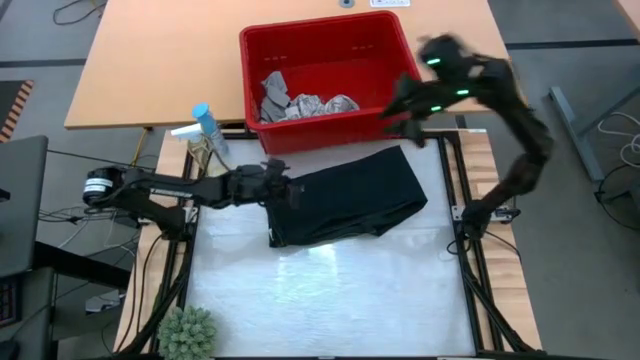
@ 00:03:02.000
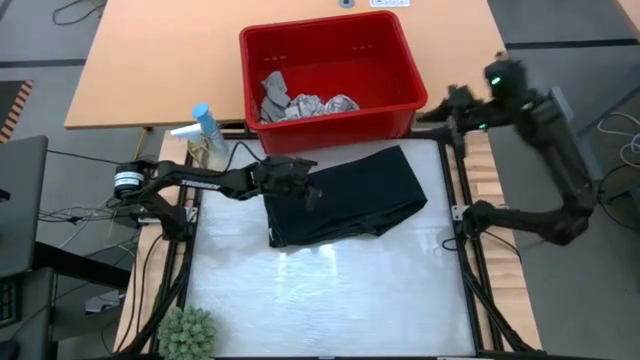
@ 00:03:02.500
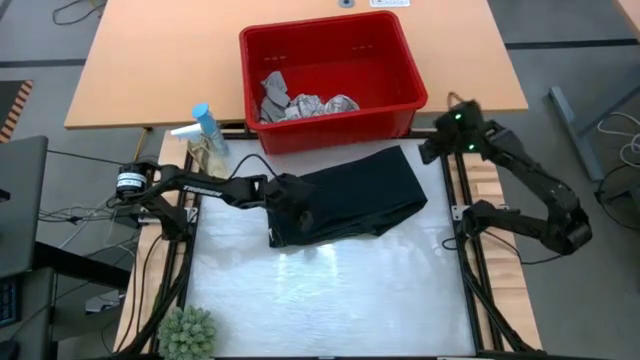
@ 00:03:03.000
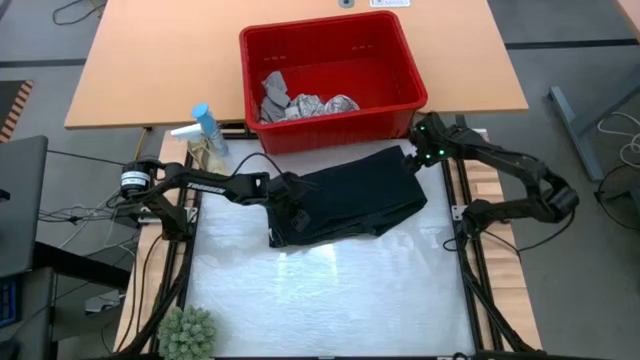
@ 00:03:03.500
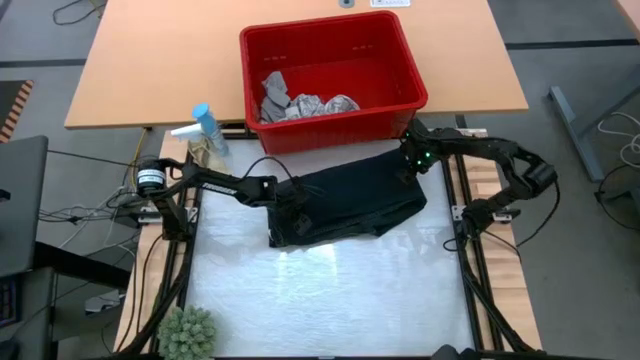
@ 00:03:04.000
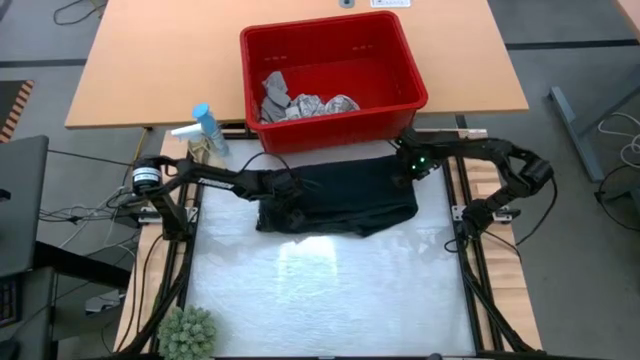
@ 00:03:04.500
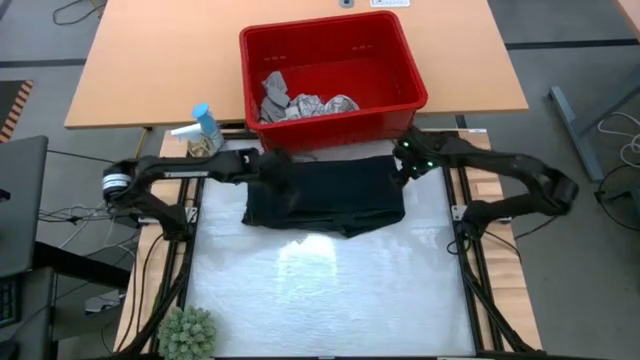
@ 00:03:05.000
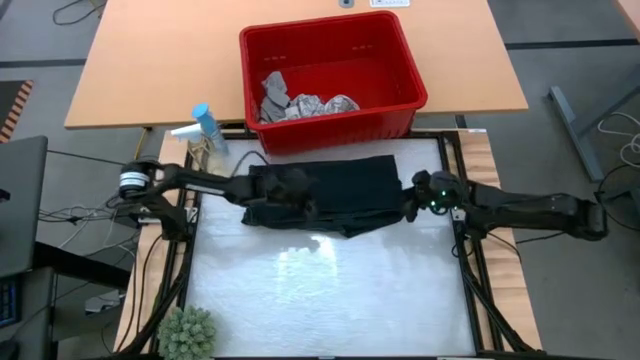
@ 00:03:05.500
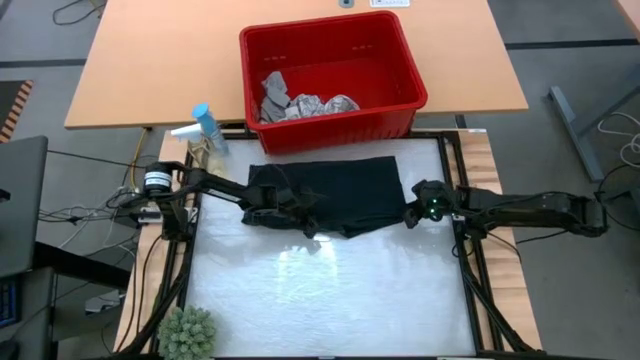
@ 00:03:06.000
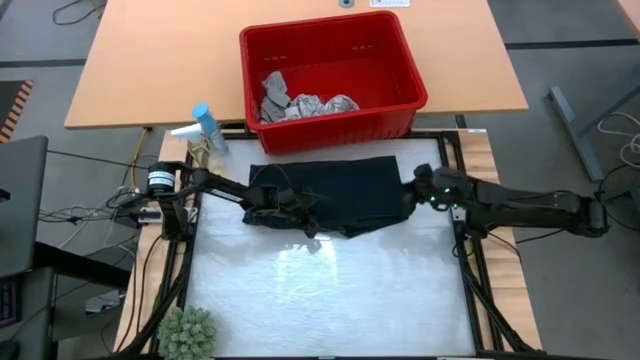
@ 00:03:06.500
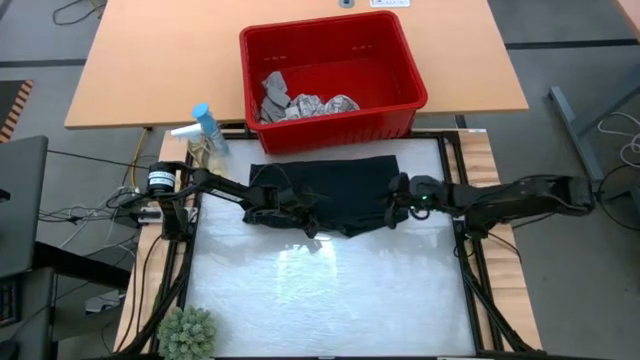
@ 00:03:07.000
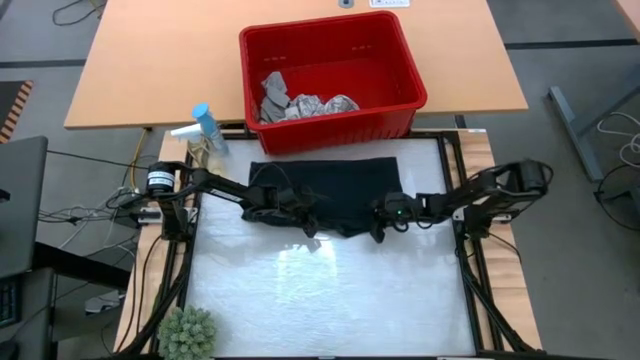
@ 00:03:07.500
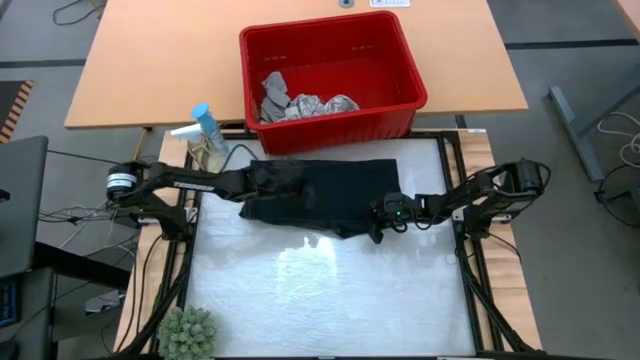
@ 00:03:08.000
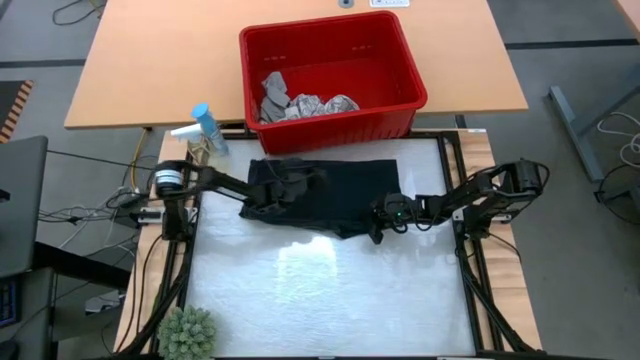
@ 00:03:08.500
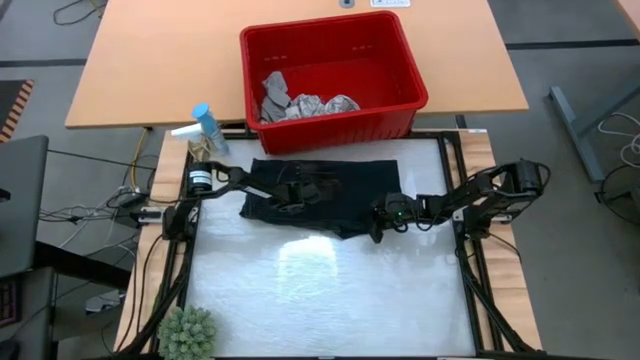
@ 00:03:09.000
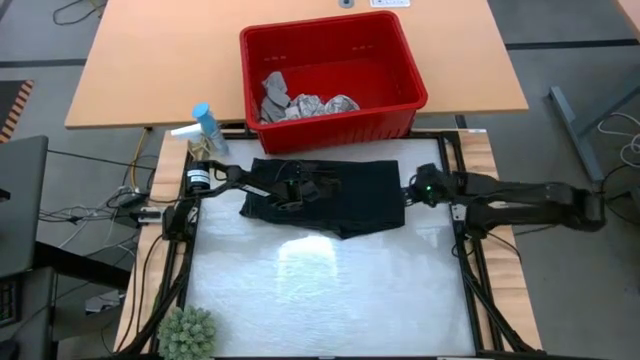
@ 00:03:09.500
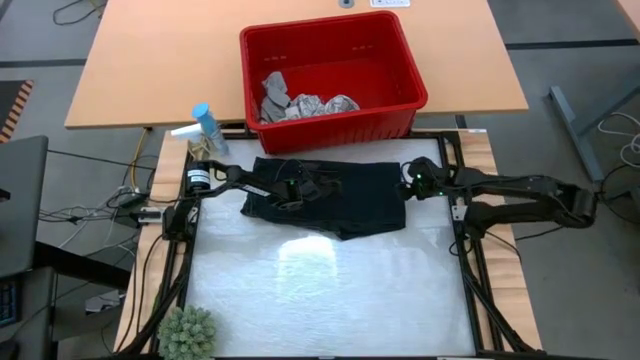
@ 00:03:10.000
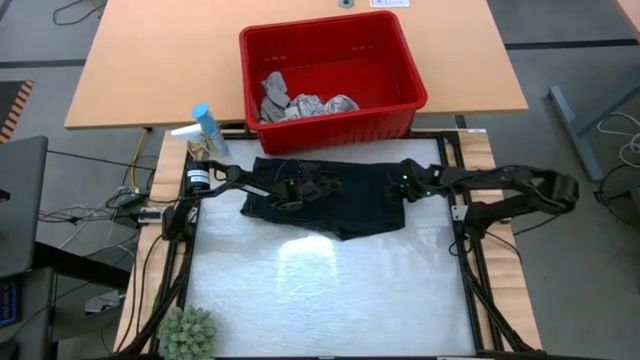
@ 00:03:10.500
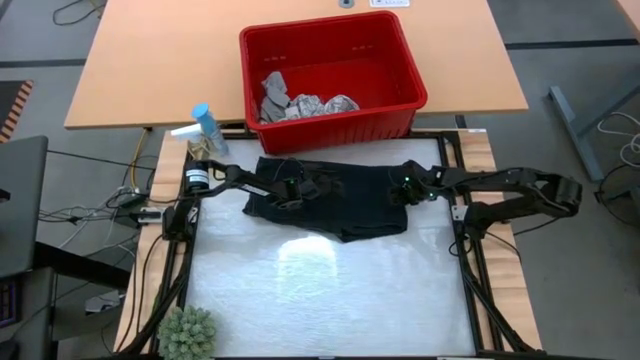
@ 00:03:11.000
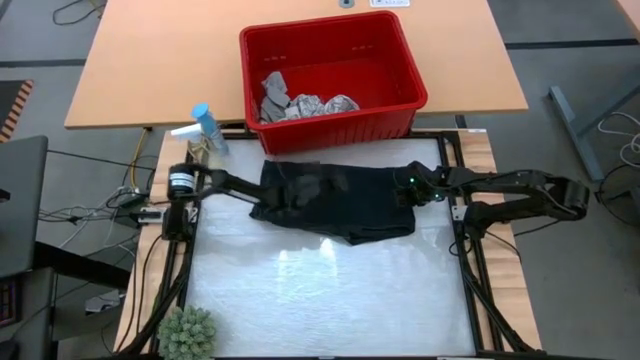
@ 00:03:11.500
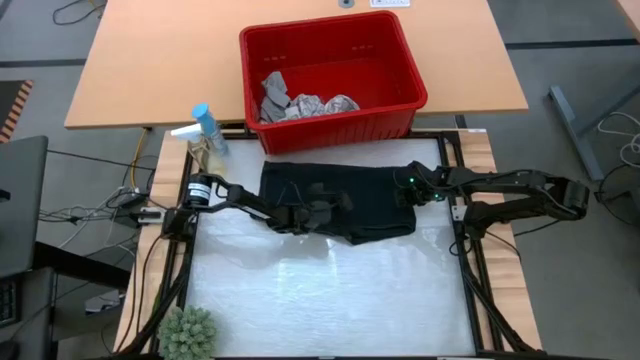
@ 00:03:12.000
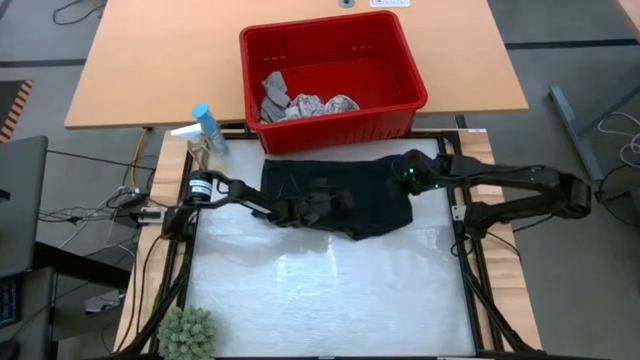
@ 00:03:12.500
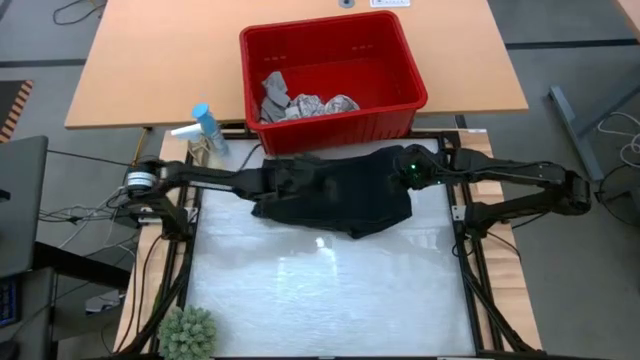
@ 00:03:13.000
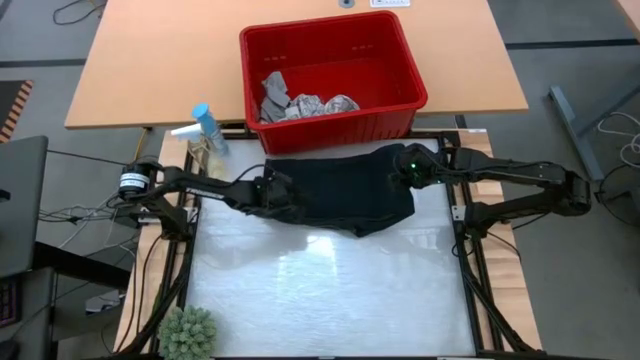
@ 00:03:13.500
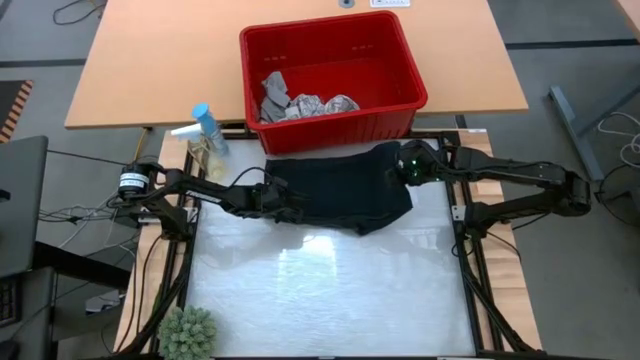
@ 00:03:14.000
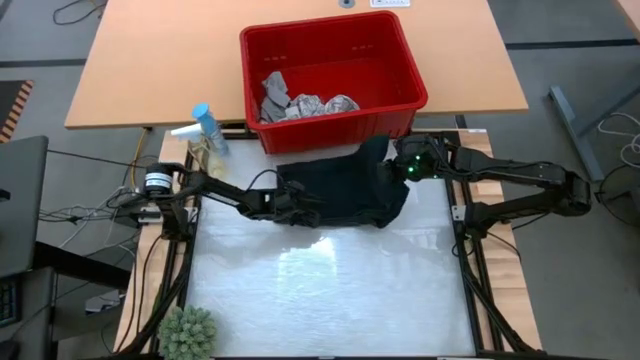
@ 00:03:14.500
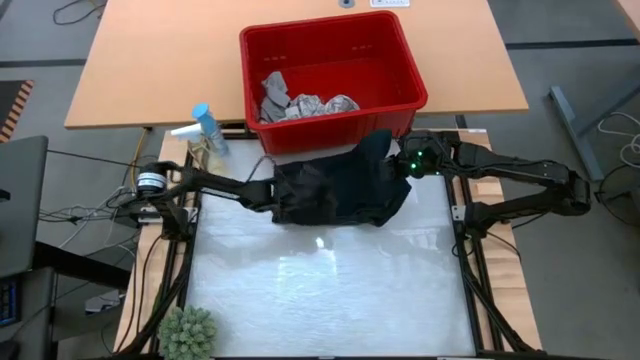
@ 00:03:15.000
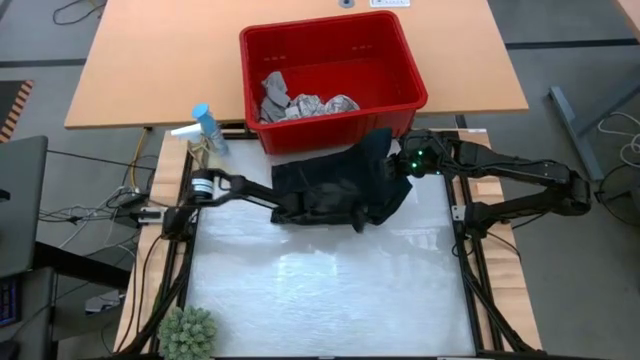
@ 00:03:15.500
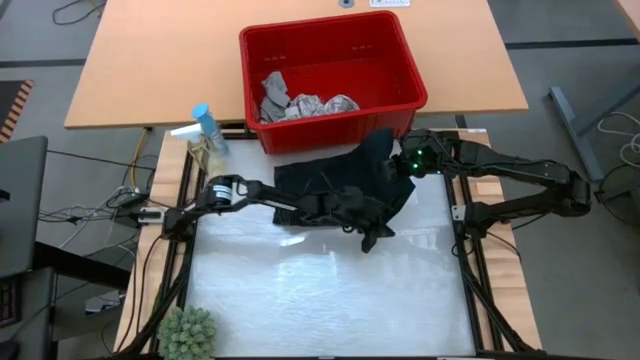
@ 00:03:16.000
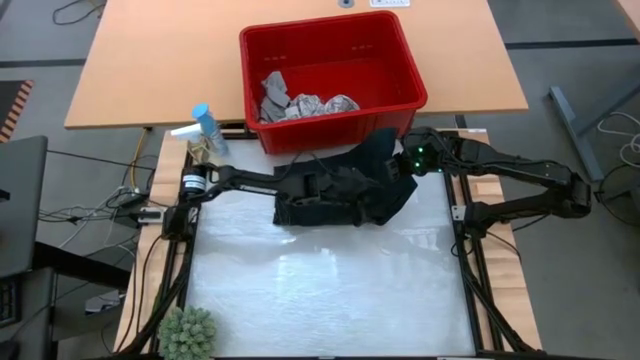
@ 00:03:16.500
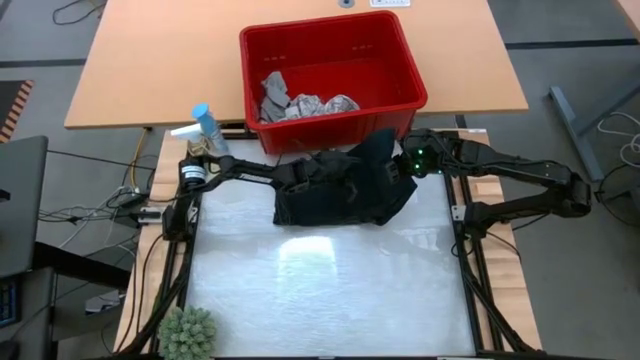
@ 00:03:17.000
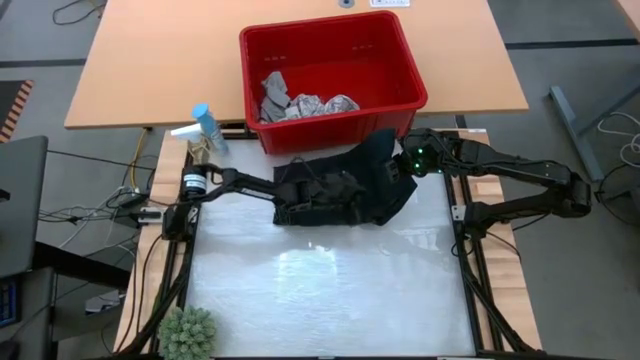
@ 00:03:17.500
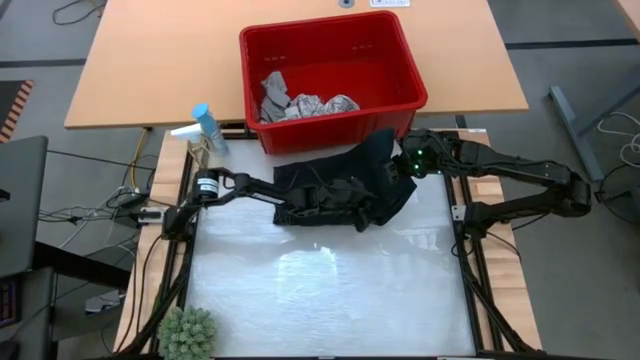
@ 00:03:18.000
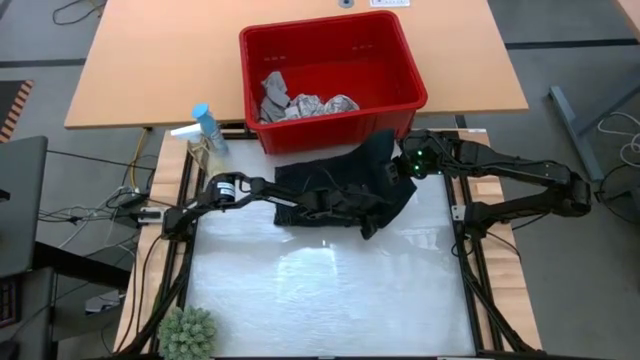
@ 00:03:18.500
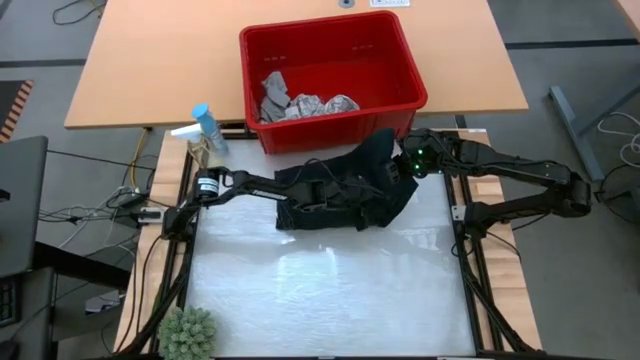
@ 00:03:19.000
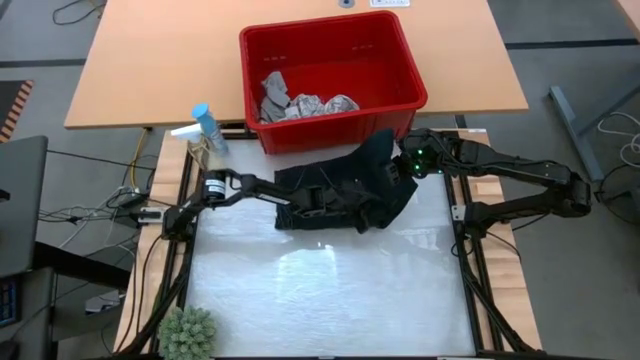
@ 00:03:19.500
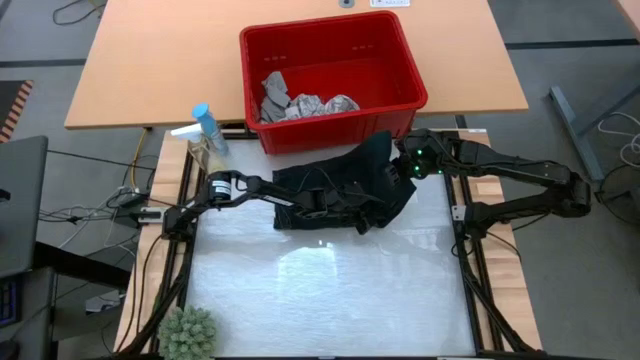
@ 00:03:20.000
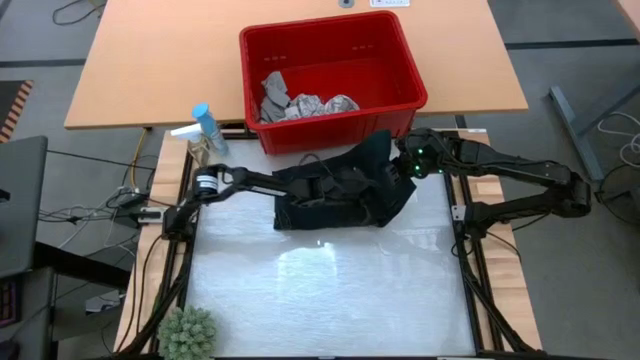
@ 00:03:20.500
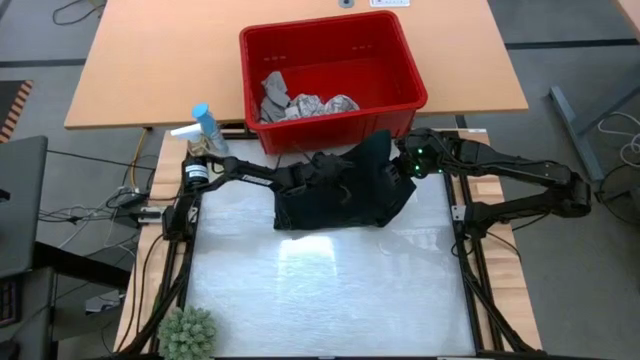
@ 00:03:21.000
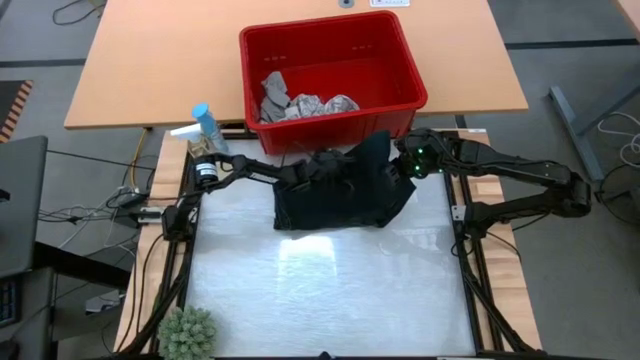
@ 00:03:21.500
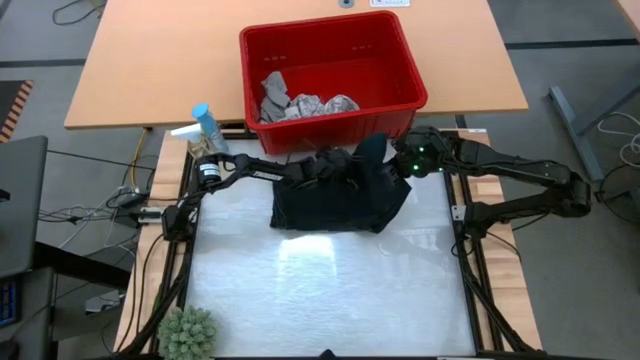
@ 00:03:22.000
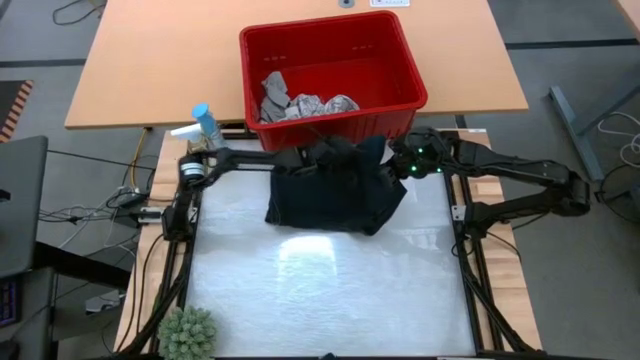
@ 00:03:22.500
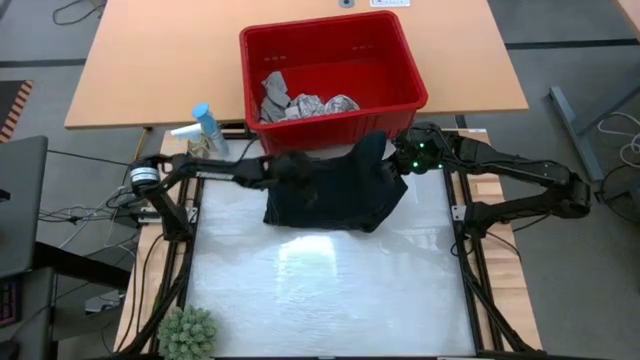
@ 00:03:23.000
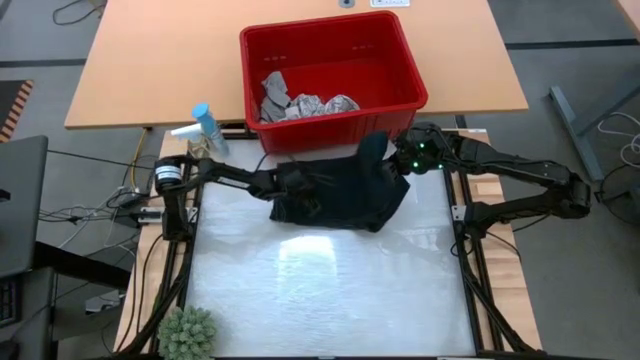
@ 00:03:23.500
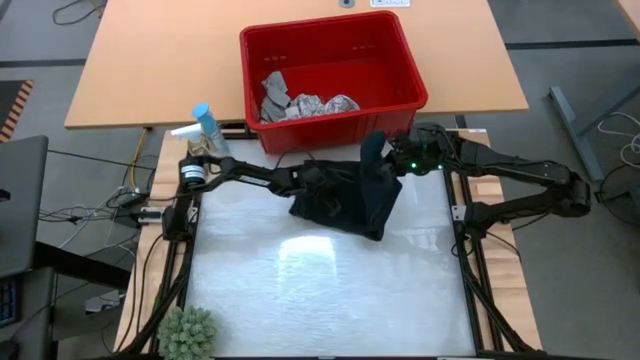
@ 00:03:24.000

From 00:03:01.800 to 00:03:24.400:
Task: Fold Laundry from Bin
Fold the blue jeans
